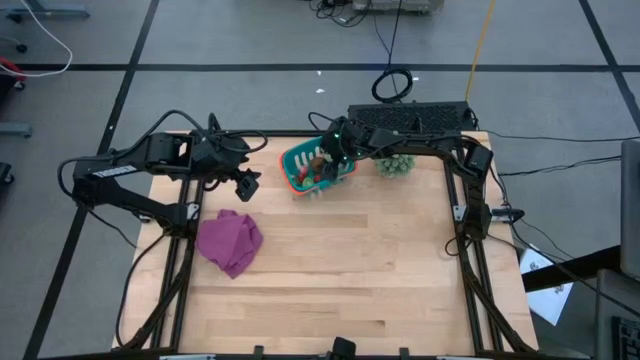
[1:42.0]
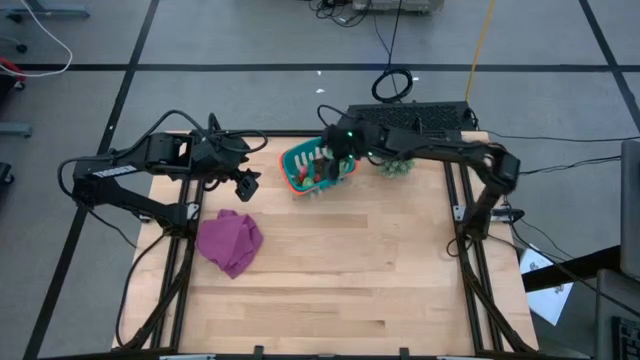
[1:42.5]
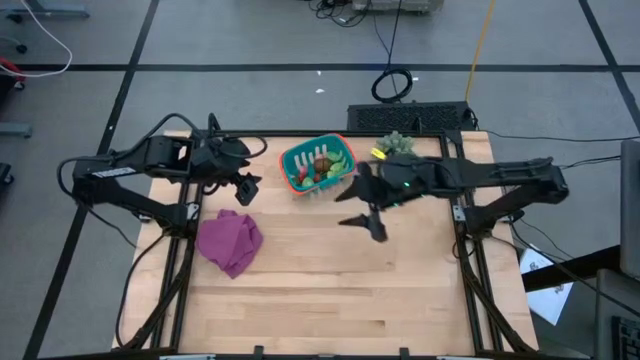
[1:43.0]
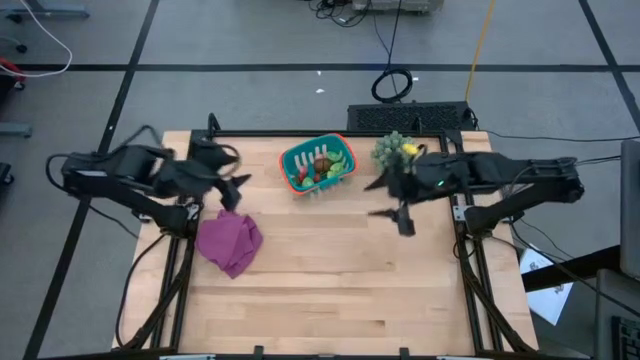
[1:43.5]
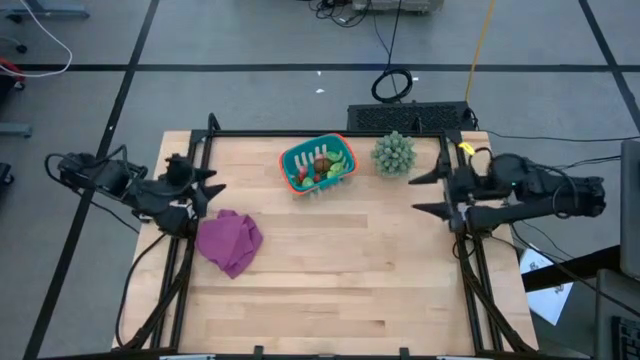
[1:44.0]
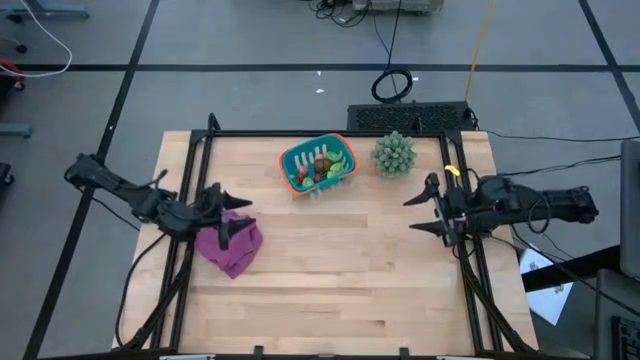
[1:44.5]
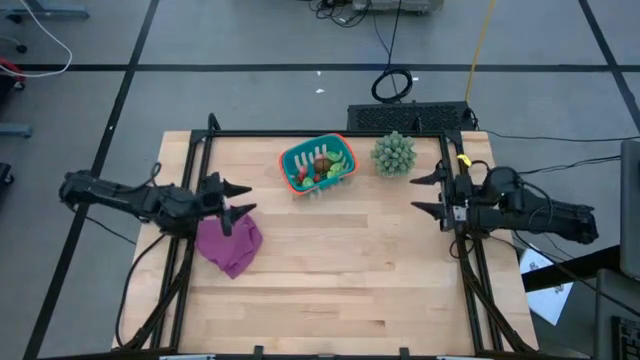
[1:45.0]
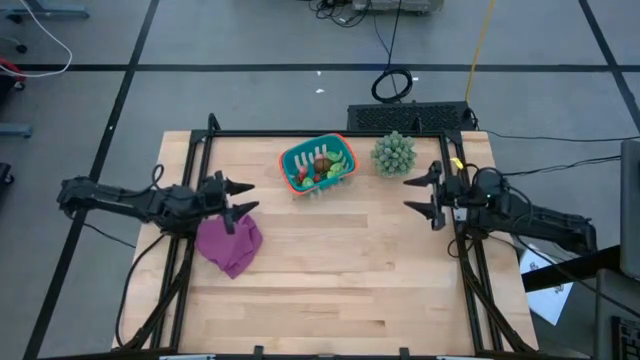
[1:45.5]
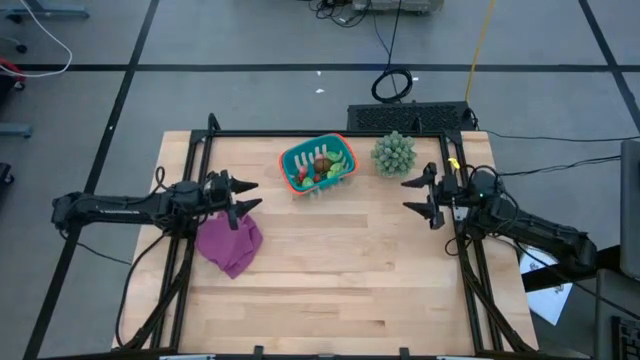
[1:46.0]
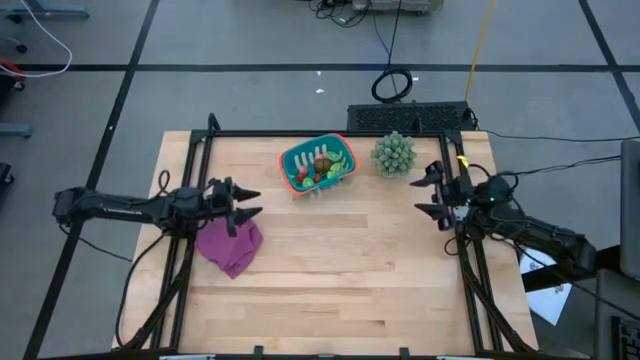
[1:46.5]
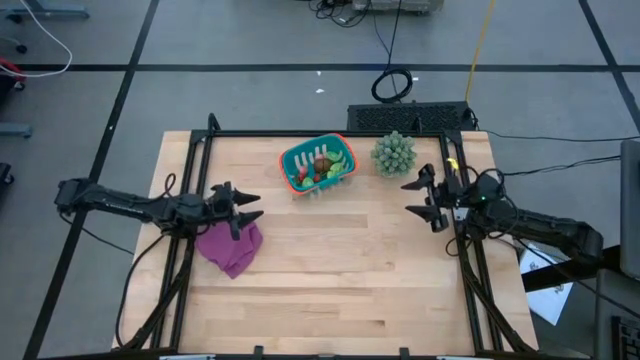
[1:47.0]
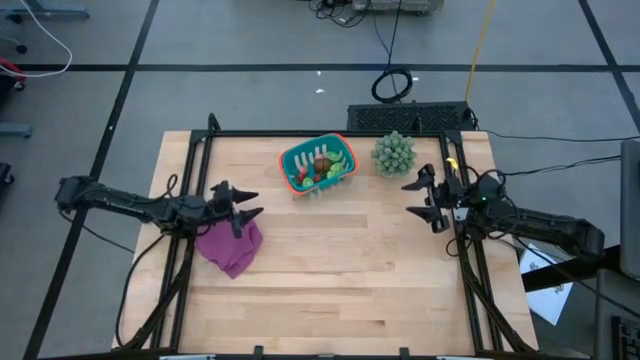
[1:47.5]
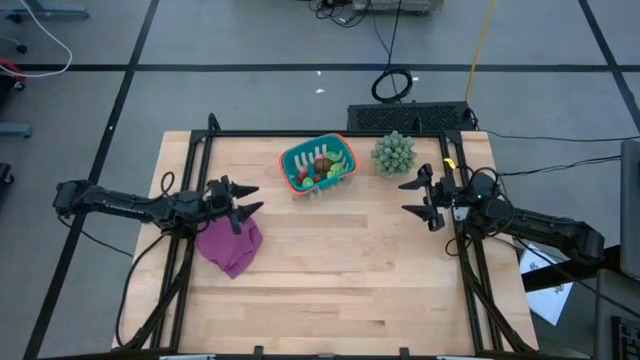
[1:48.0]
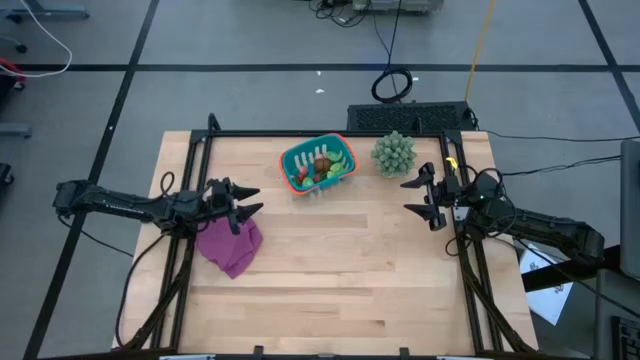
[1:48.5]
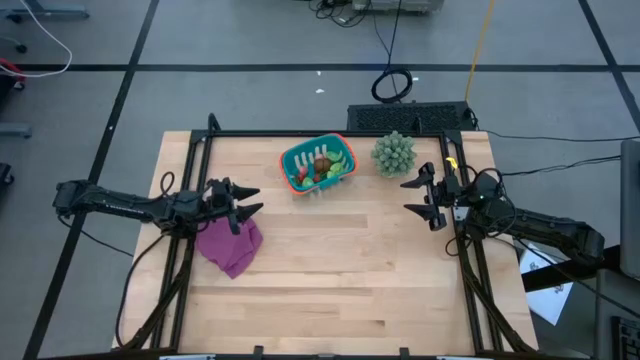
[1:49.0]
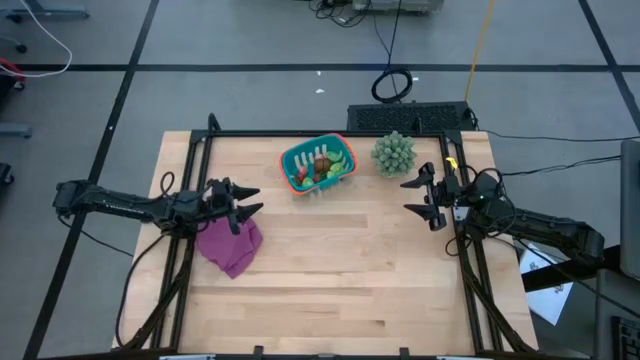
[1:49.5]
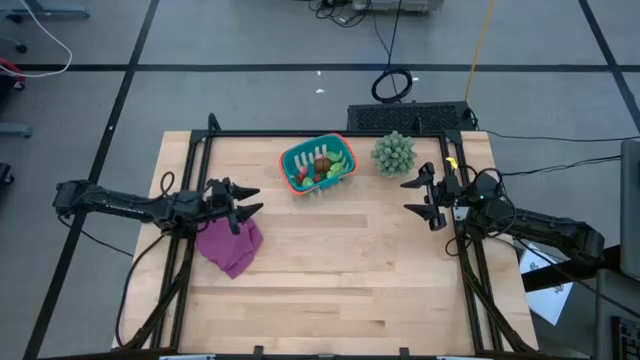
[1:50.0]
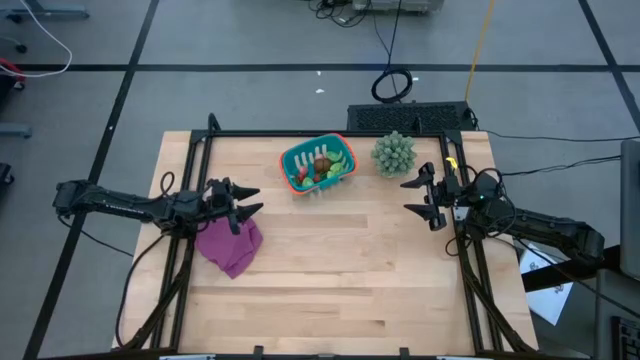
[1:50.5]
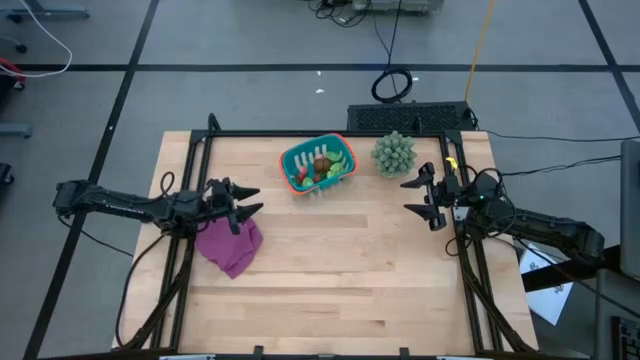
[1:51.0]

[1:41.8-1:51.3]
Task: Pick and placing Produce into tupperware
Return to Home Position

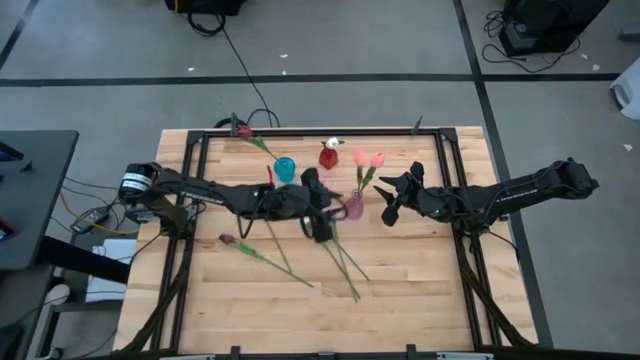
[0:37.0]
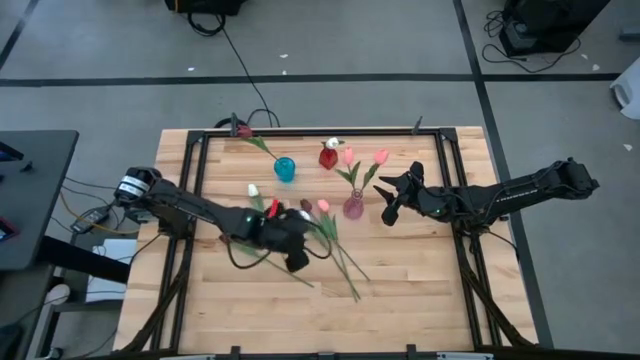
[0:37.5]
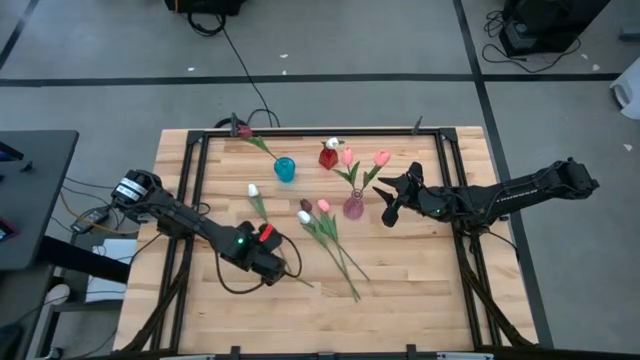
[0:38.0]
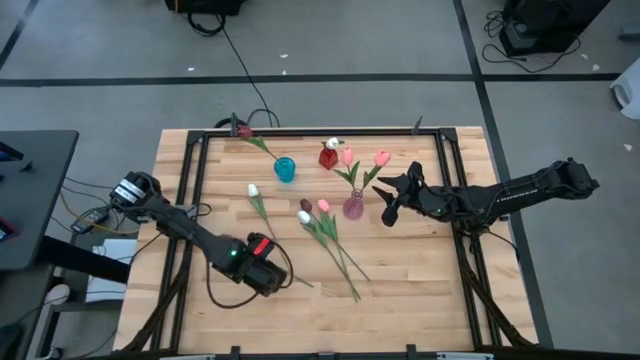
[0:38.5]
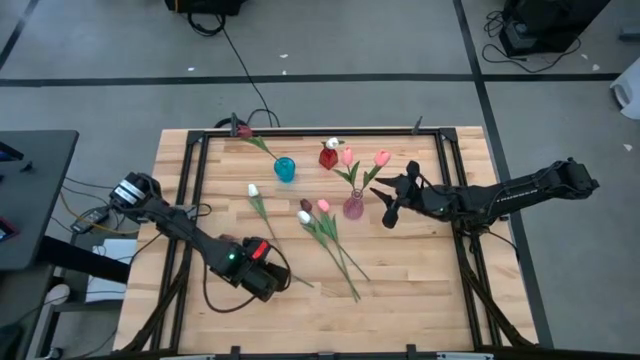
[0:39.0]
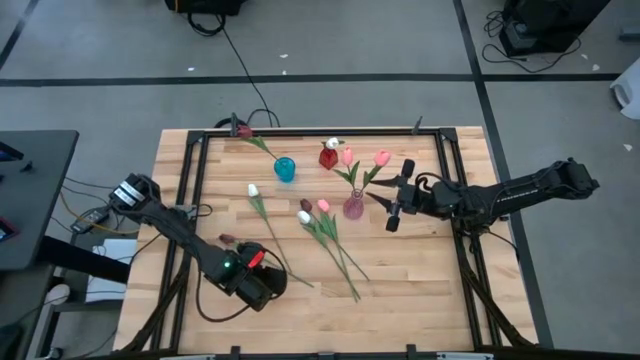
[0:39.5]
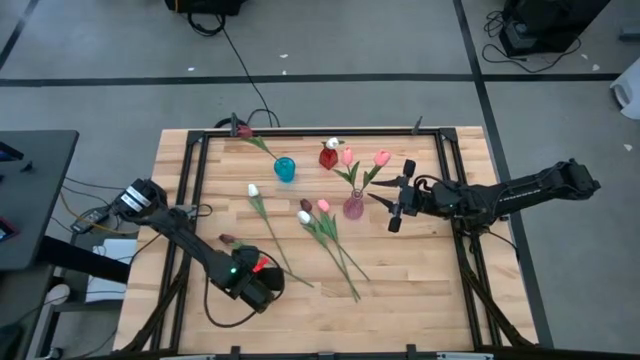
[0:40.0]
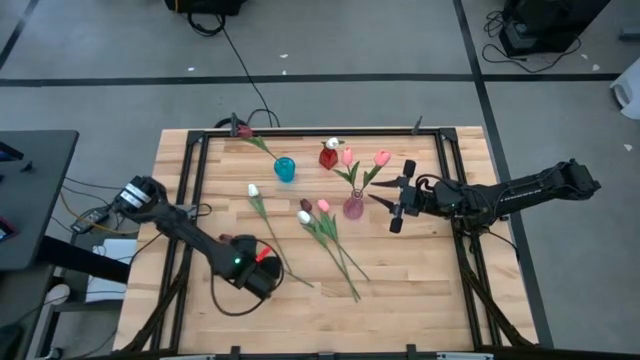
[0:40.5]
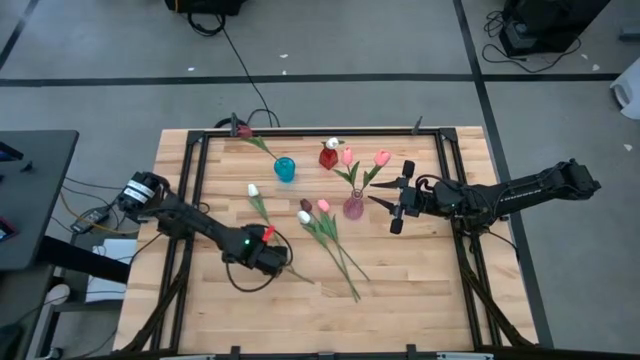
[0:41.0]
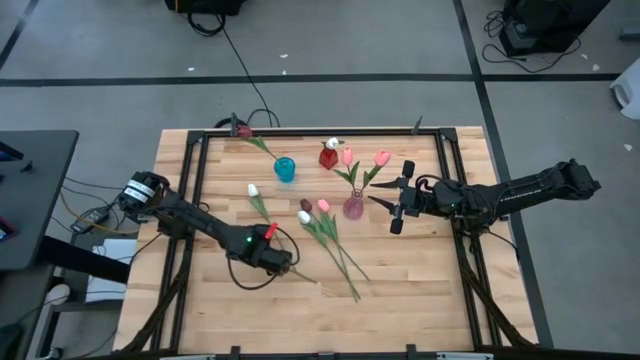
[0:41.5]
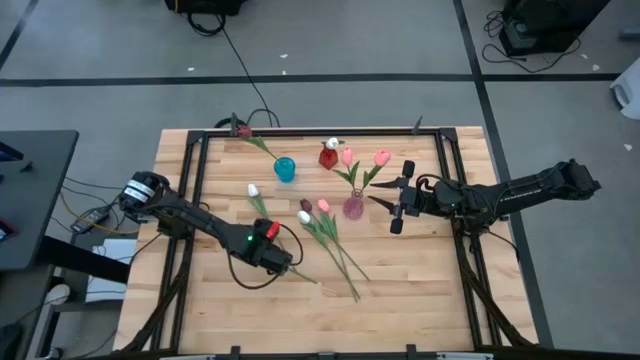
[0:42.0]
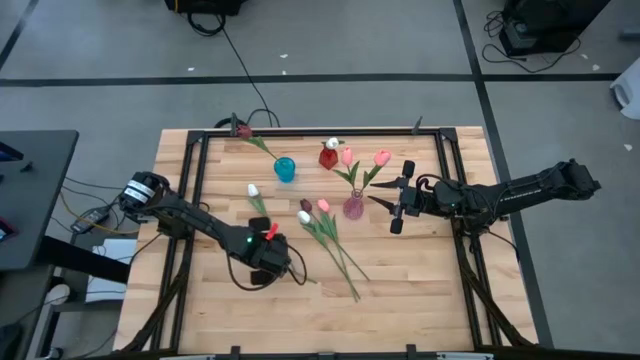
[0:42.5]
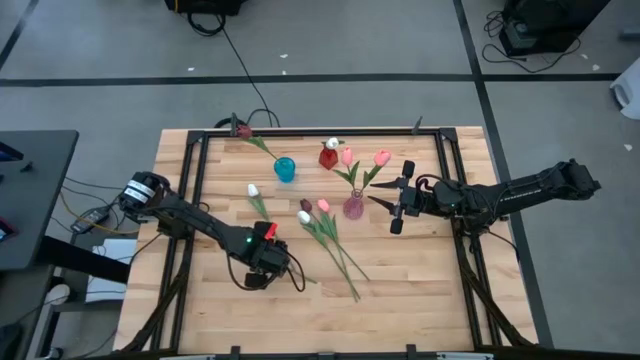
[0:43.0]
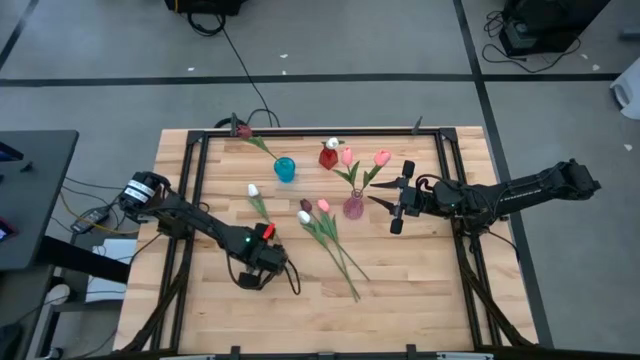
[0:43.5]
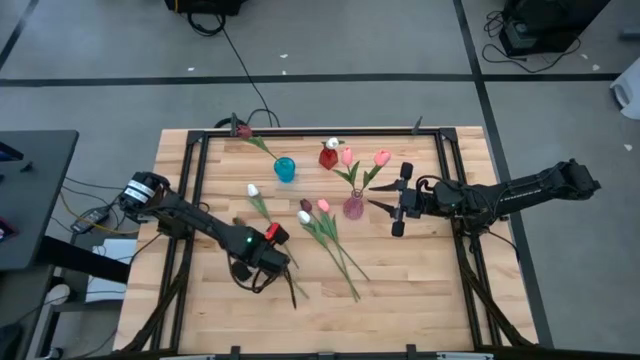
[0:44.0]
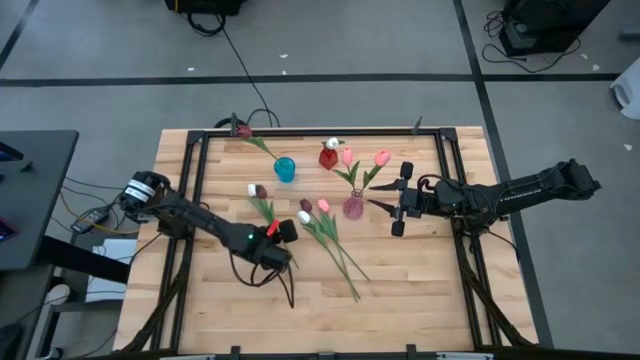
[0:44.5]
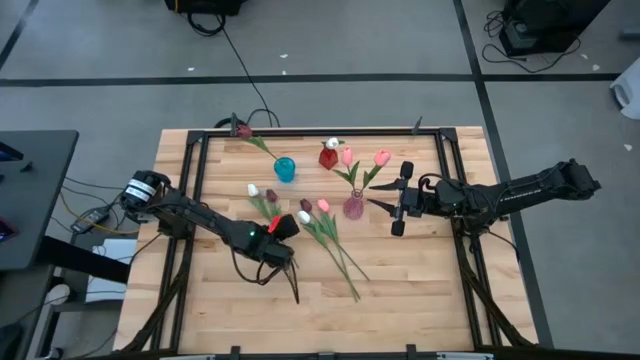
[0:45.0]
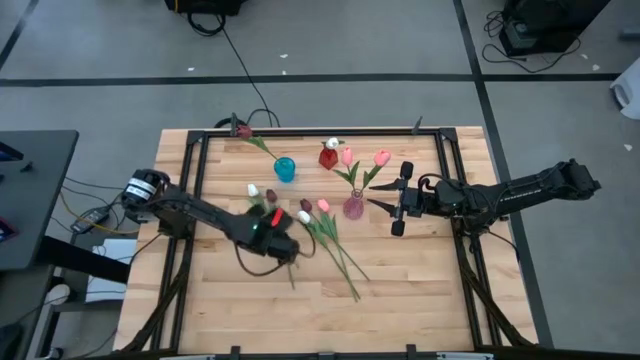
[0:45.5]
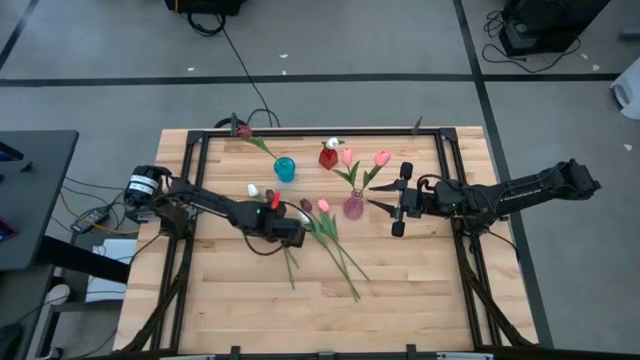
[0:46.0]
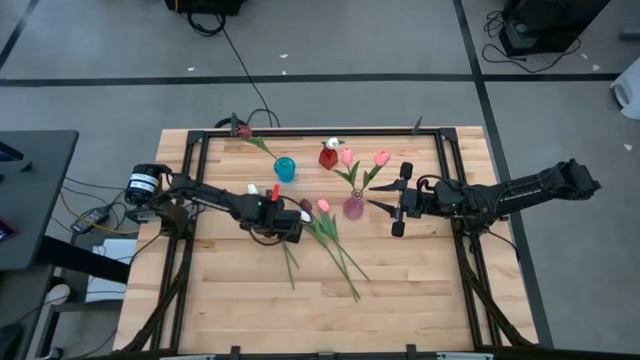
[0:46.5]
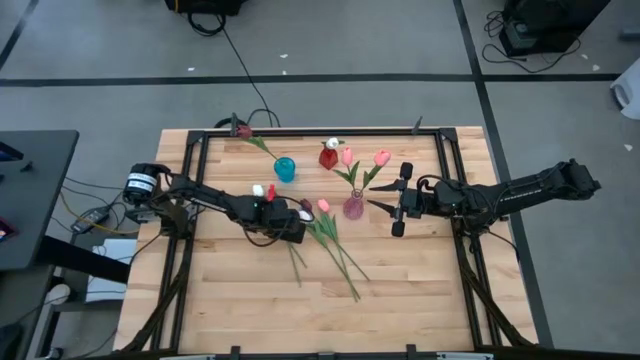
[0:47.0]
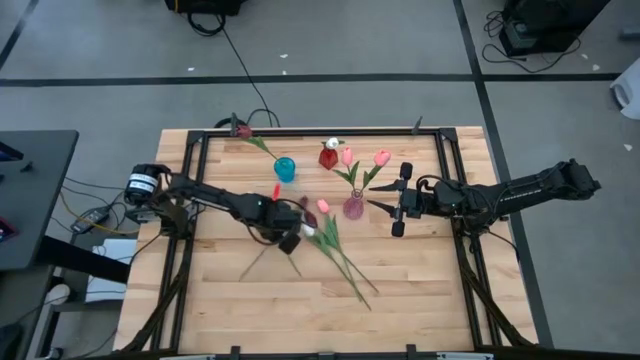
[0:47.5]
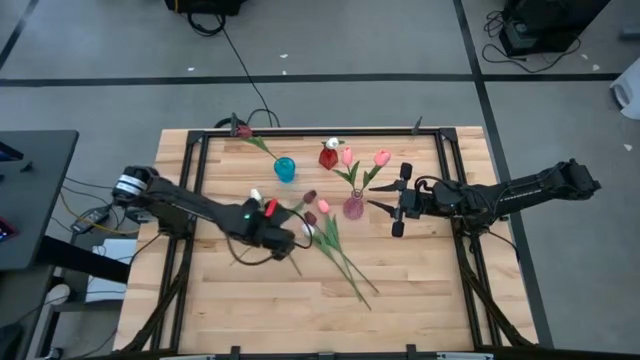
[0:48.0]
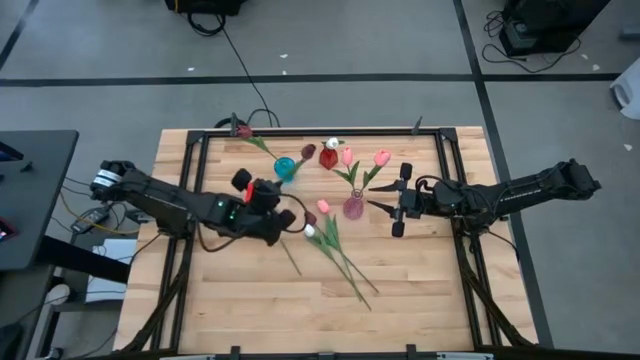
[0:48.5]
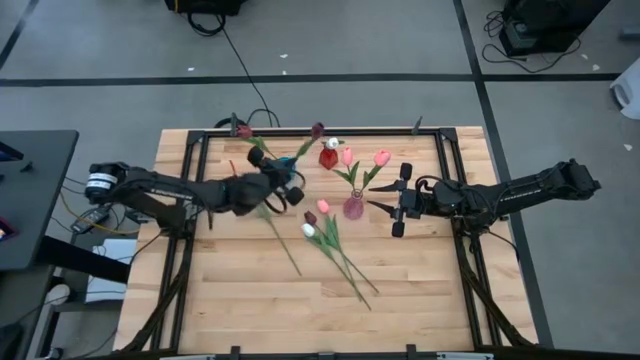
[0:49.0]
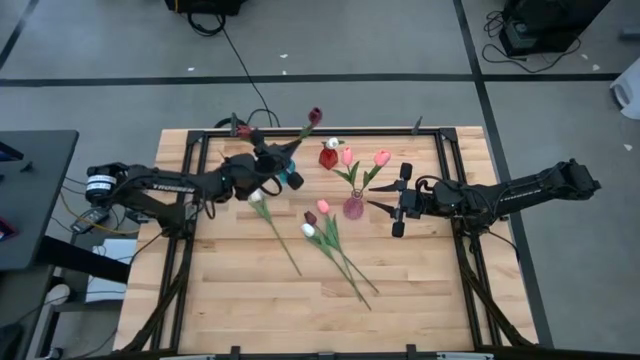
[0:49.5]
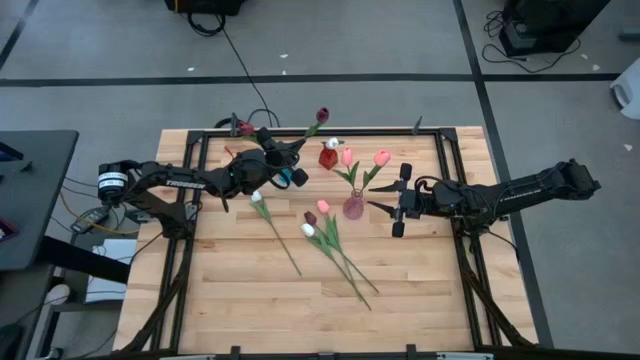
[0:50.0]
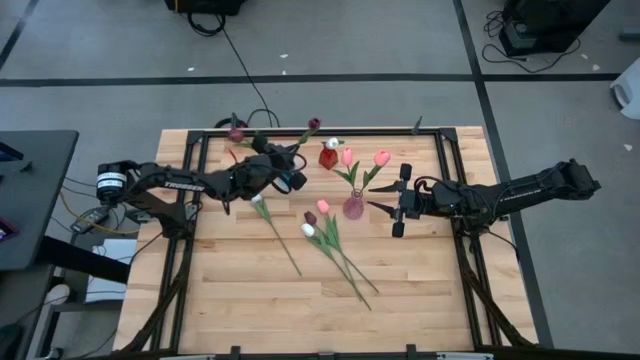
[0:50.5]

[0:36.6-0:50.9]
Task: Sort flowers into vase by color
Put the left red tulip into the the blue vase
